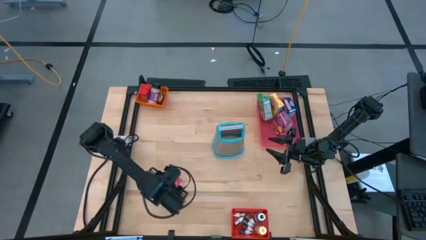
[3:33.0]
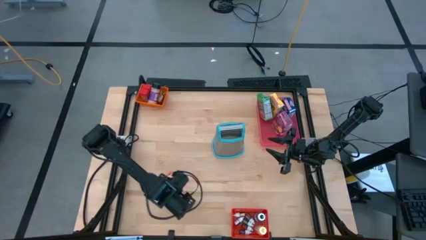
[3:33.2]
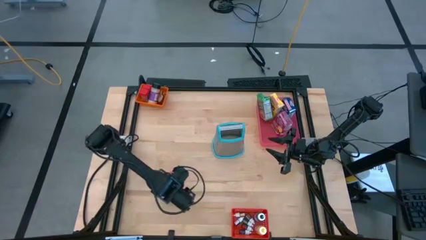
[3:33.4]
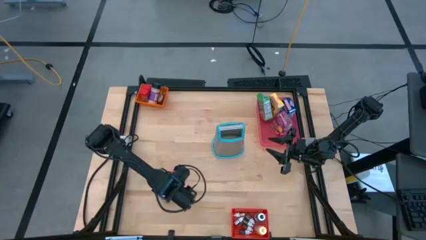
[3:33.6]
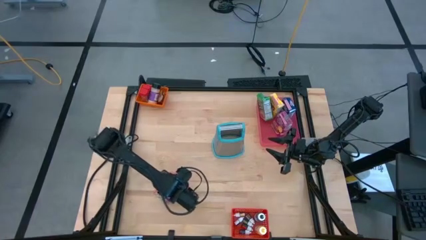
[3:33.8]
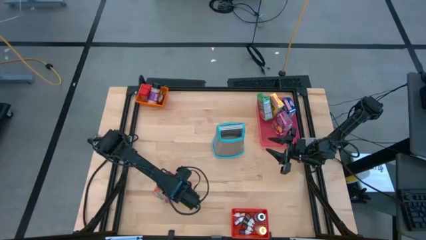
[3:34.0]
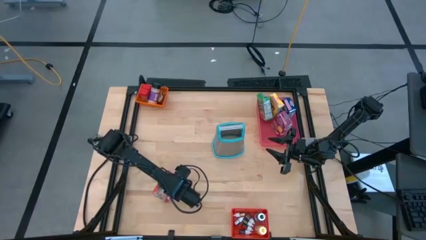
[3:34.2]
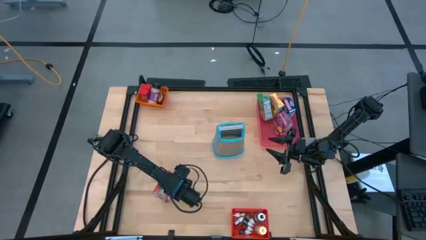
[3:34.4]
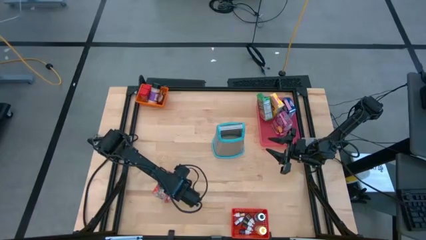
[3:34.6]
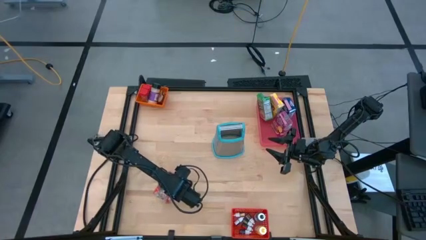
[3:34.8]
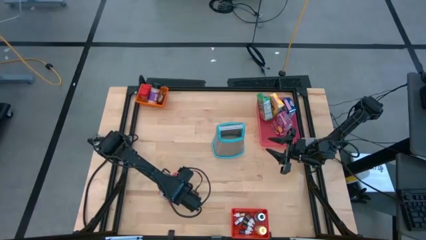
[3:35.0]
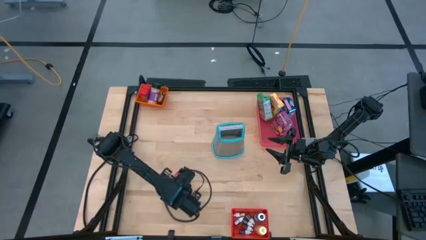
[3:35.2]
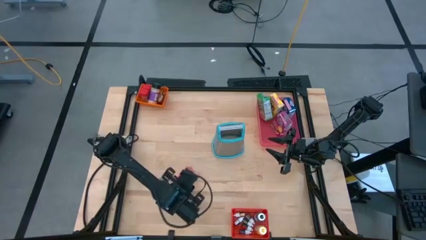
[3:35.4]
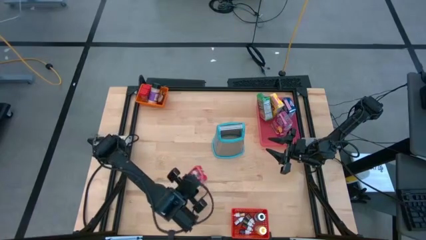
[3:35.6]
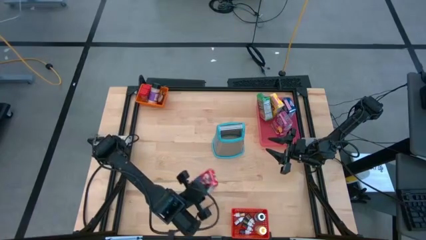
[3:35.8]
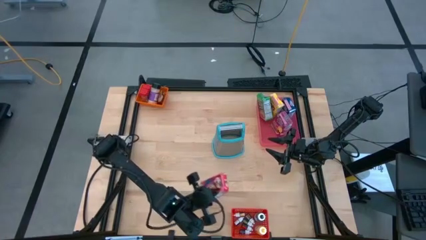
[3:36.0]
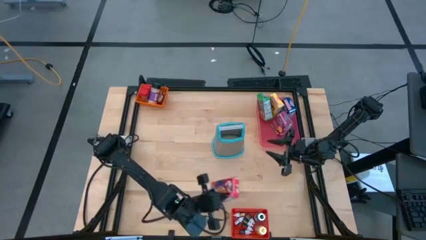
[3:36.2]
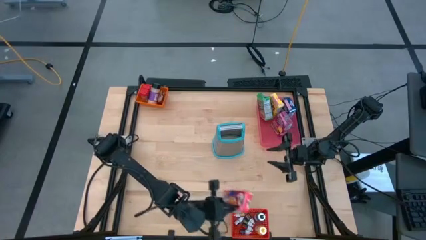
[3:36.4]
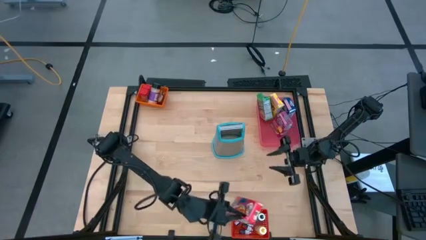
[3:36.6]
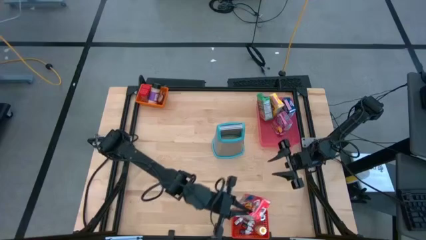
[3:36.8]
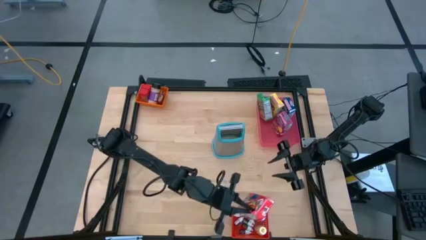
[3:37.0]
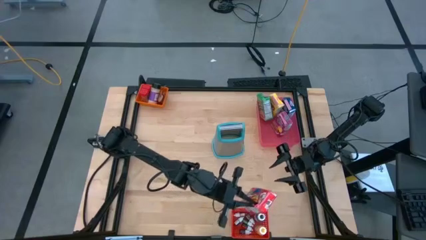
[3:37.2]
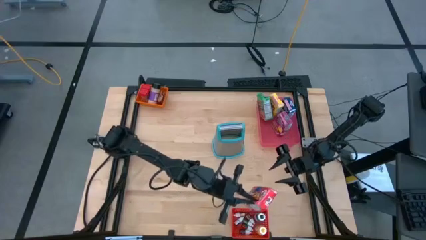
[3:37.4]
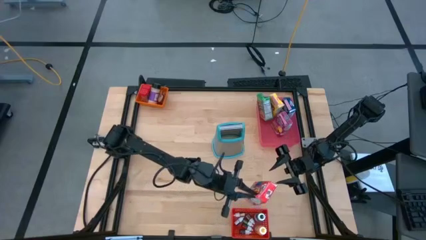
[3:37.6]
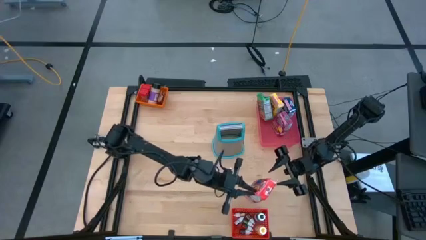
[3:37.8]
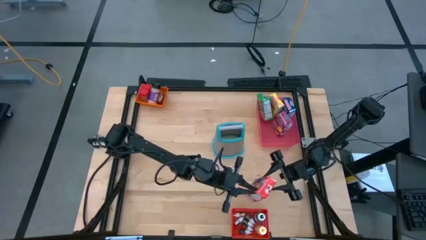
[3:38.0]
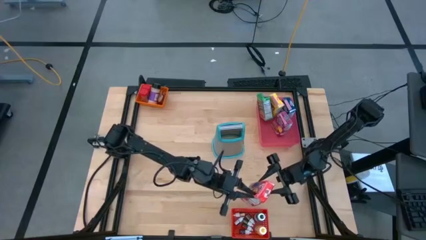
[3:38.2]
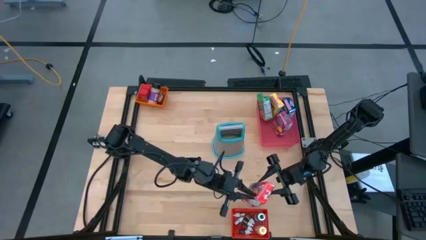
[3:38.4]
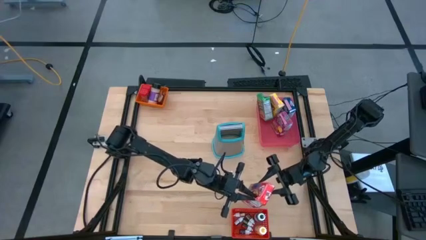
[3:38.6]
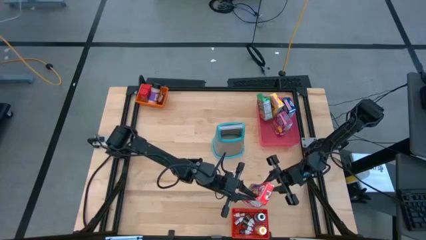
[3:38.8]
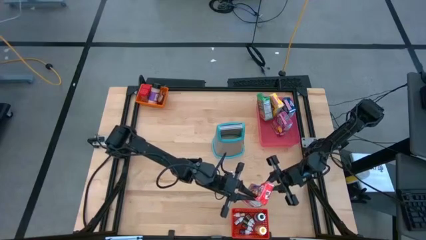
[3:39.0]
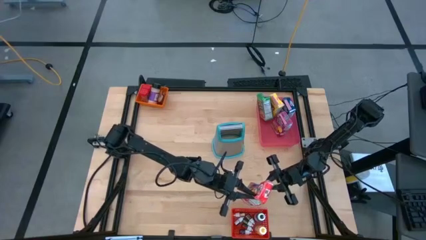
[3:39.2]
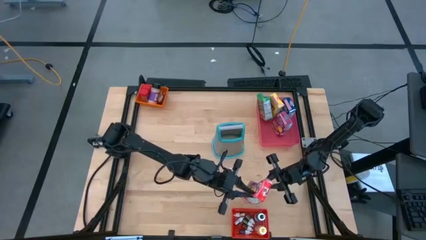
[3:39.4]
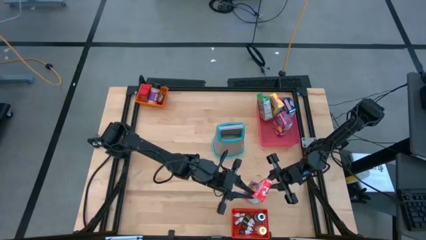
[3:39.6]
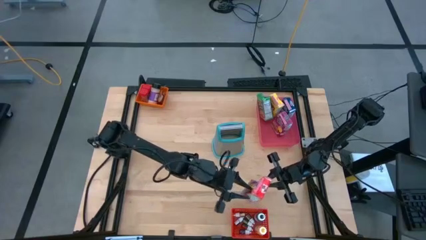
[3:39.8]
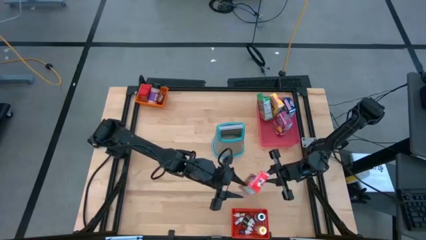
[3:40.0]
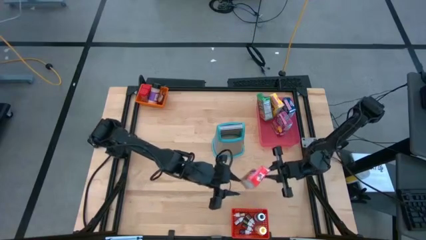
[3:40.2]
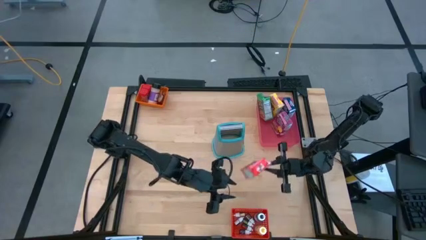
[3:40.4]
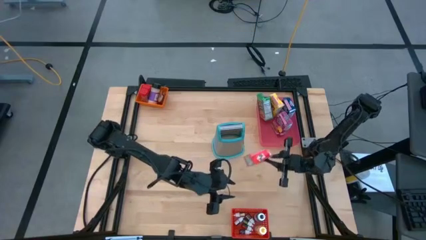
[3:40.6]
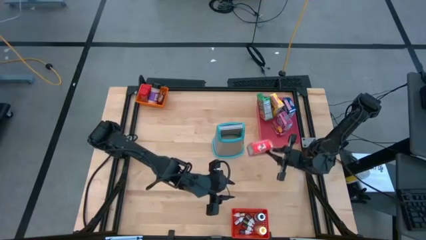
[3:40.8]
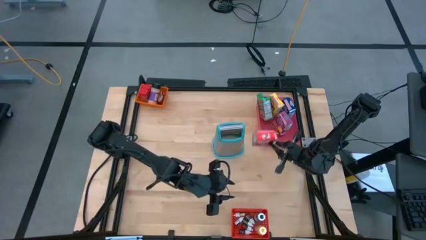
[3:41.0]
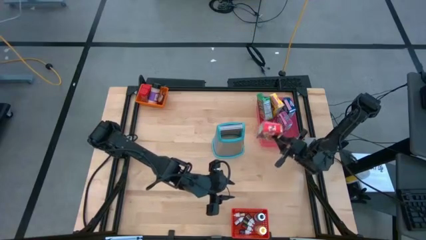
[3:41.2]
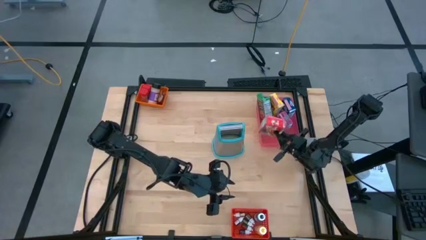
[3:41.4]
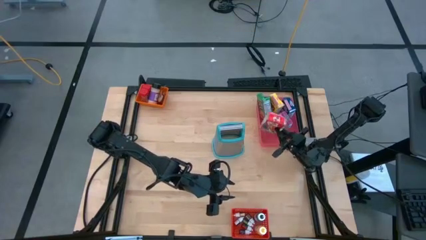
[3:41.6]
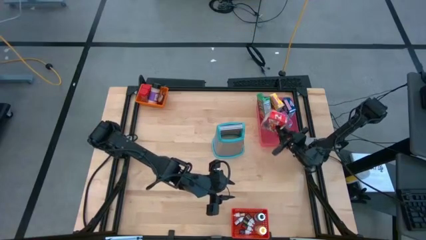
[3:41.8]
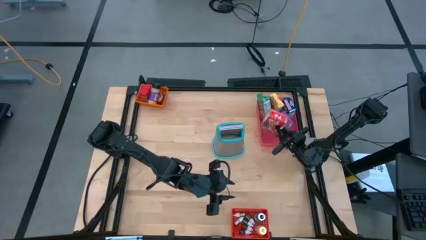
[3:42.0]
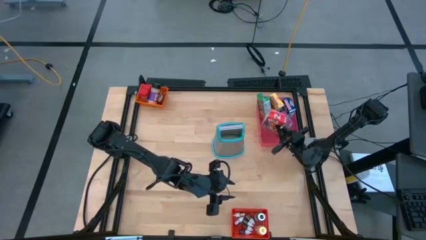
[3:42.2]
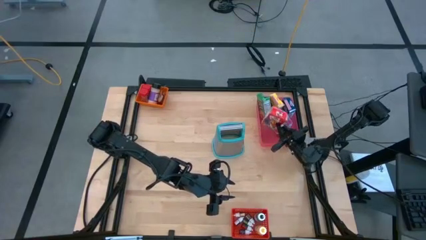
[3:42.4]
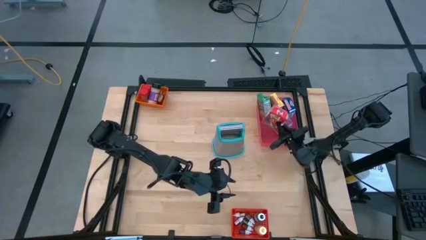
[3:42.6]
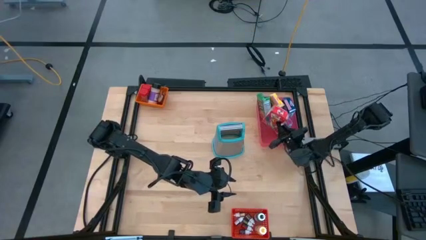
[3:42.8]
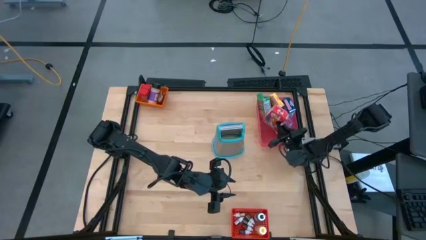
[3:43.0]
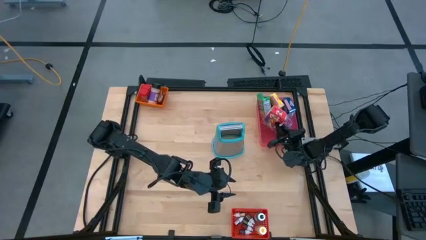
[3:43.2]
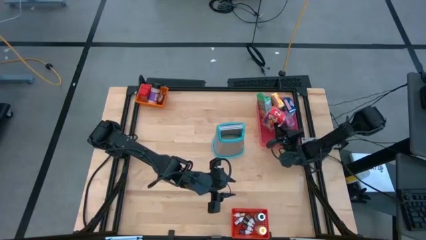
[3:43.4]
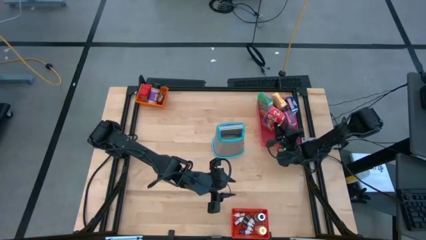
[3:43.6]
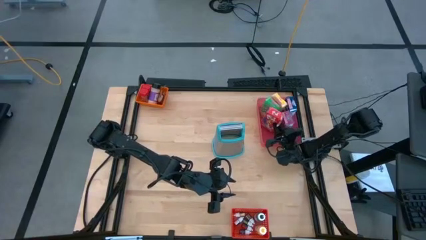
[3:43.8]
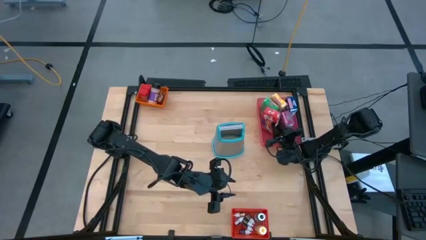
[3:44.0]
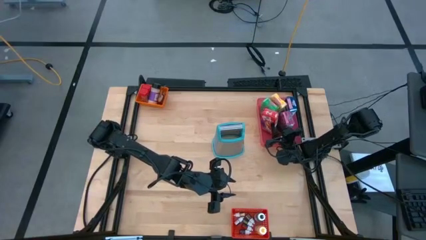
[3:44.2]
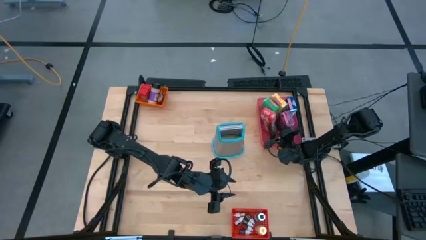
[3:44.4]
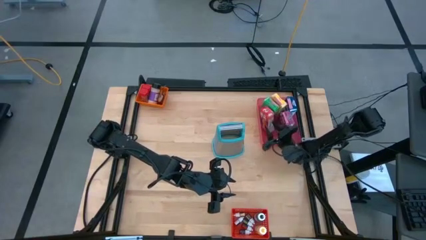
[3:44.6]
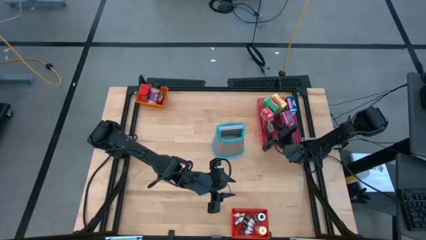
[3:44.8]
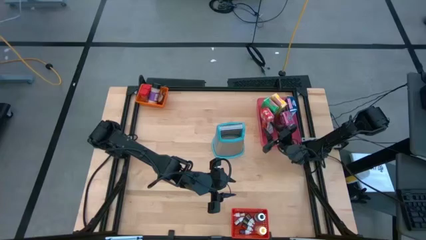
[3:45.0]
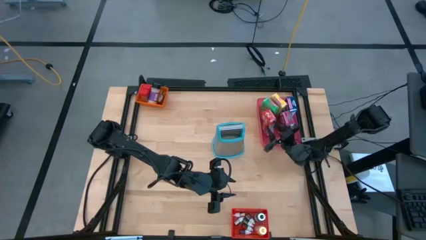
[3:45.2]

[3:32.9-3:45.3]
Task: Pick & Place Kitchen Items
Put the red cereal box into the pink bin

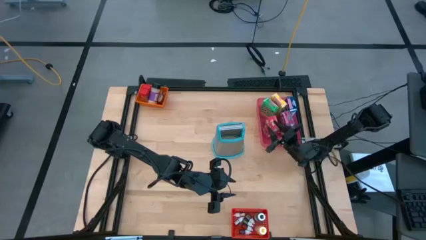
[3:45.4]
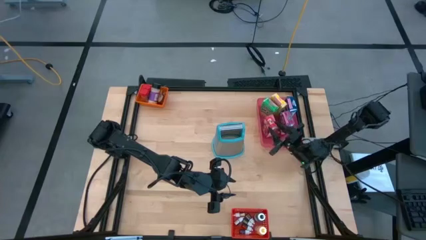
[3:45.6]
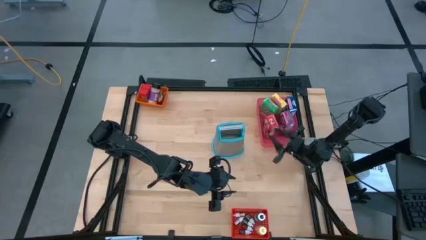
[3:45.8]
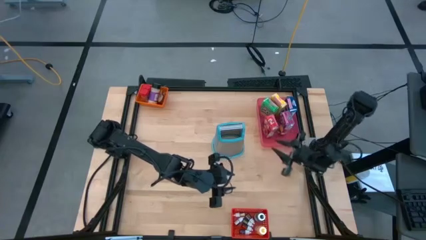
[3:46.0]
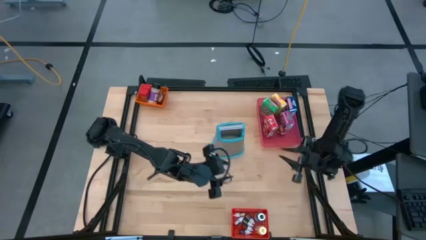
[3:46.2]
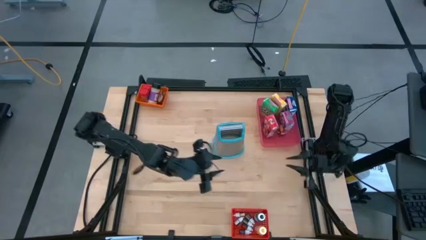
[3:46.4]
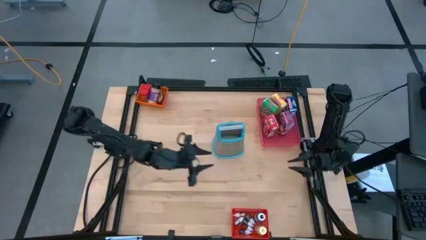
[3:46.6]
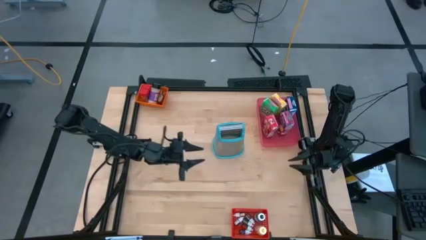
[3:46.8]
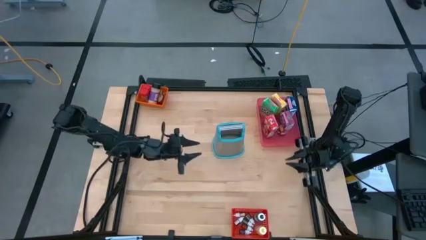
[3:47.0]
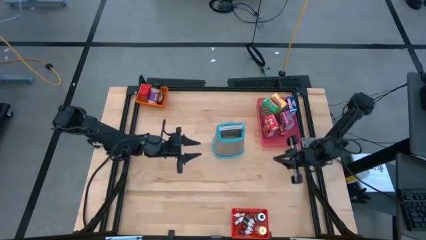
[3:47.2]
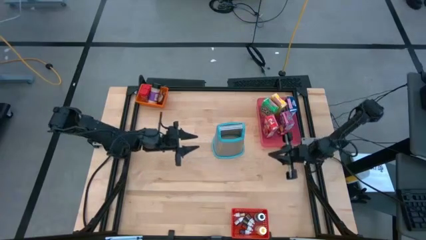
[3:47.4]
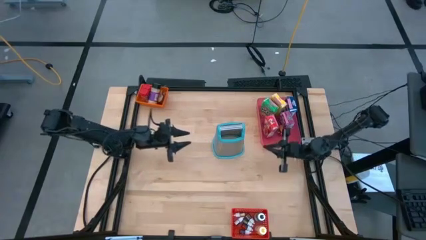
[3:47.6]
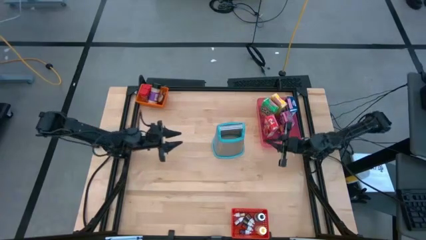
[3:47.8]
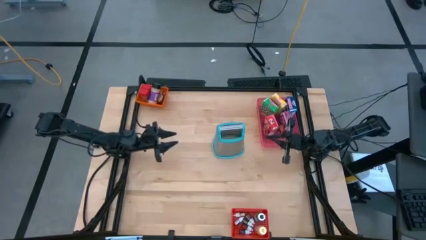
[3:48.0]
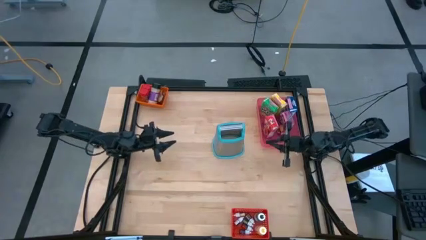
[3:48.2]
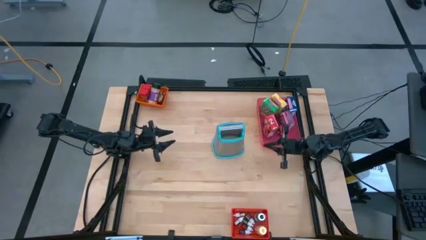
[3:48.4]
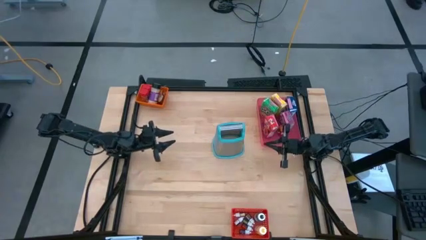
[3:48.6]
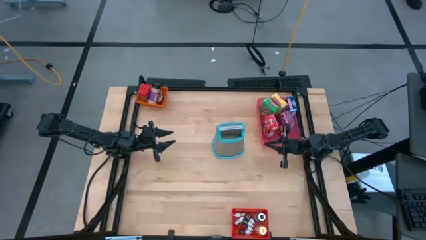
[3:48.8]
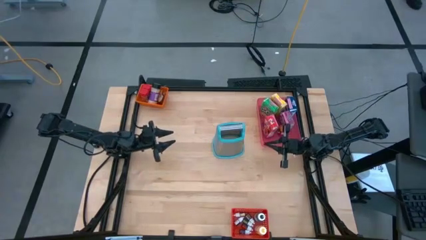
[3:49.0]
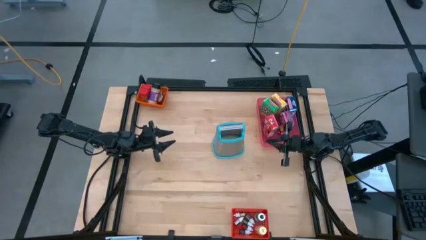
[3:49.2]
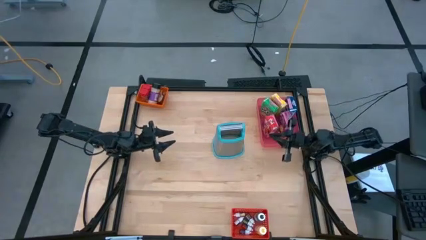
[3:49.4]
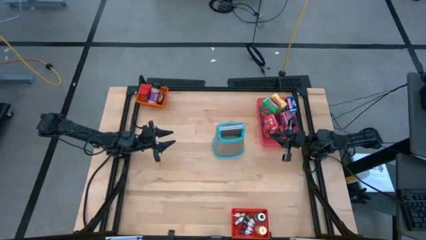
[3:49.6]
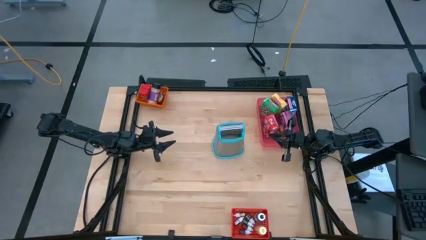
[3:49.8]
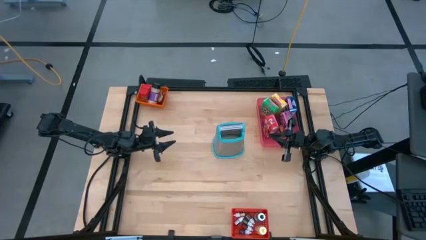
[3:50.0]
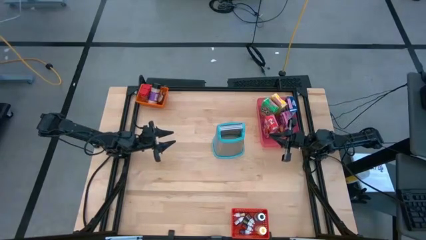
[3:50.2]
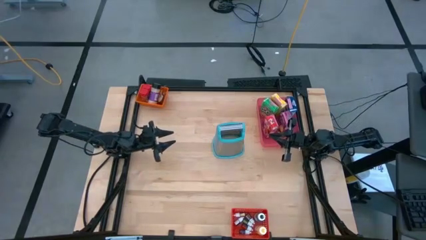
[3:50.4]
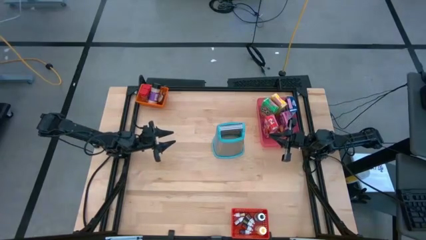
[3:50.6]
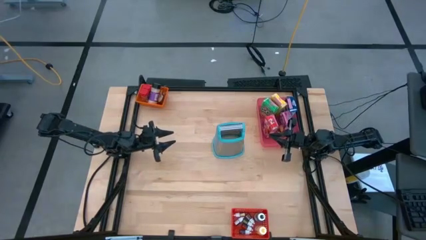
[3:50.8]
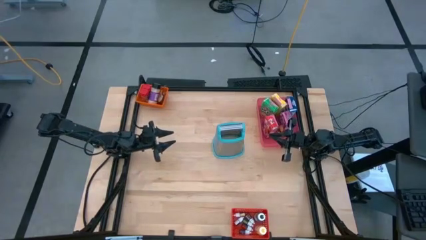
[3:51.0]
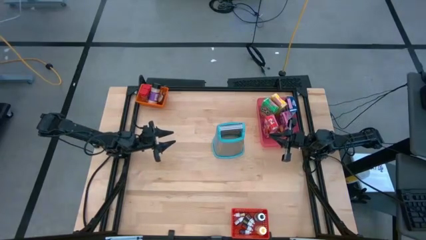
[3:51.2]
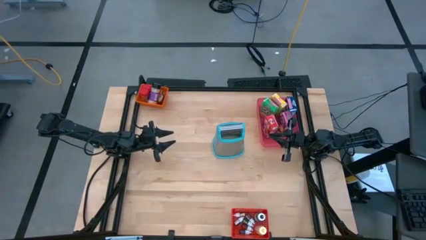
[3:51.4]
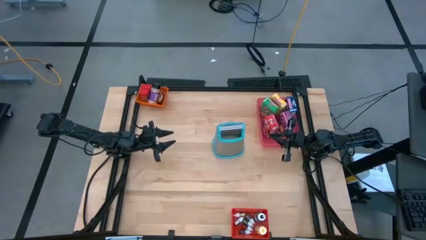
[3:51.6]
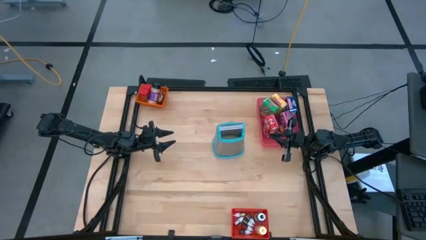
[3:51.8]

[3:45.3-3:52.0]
Return to Home Position
